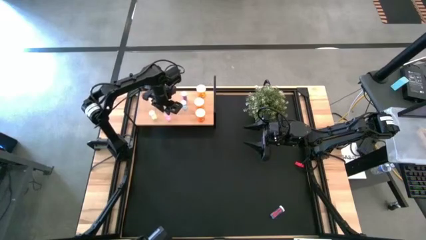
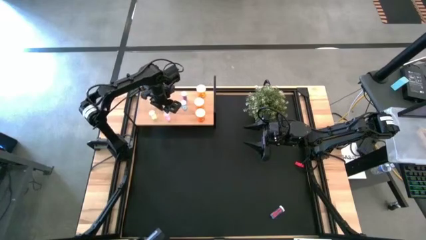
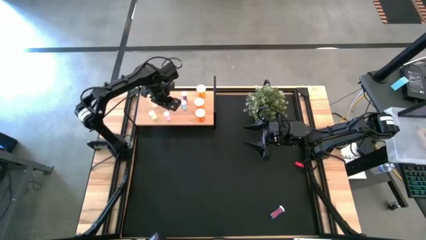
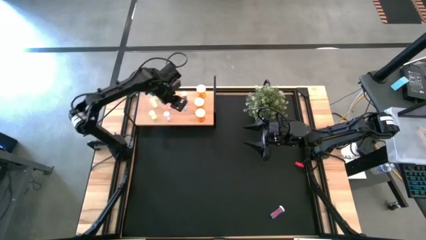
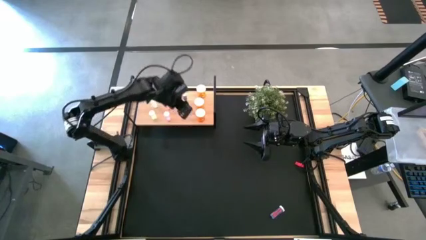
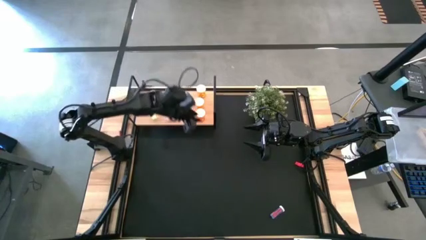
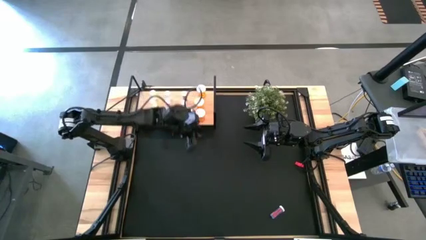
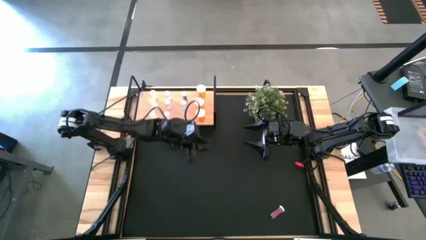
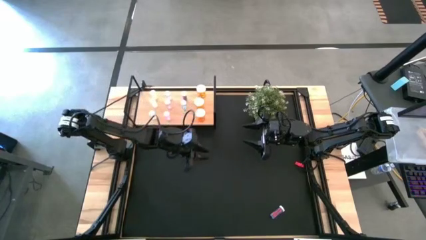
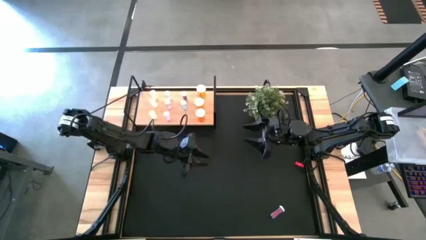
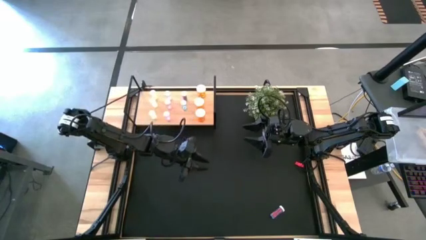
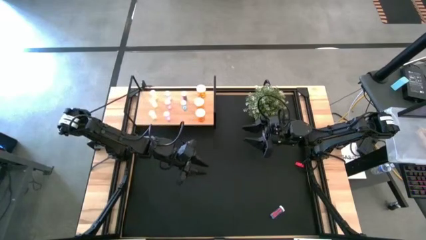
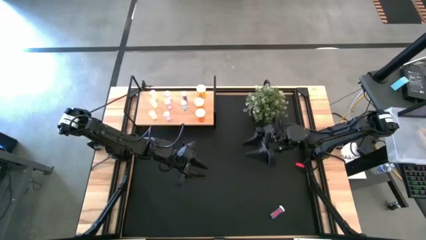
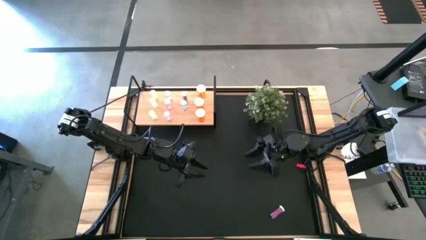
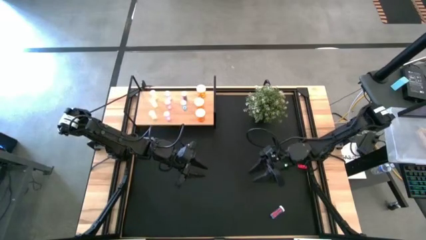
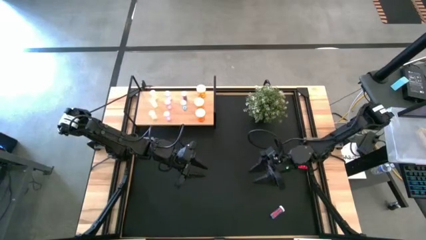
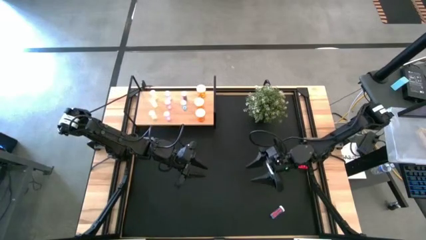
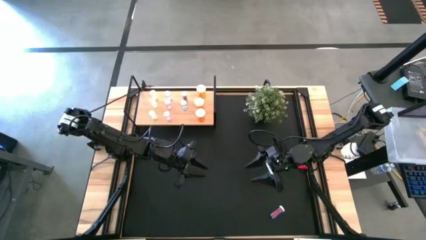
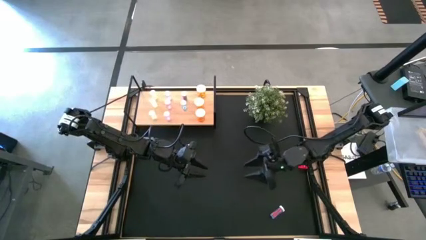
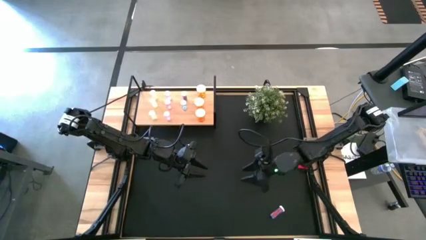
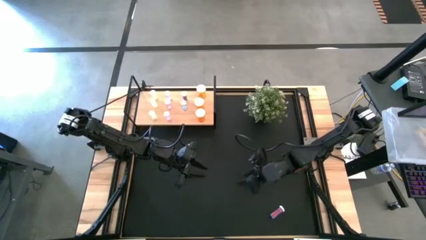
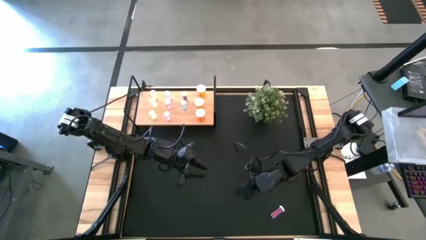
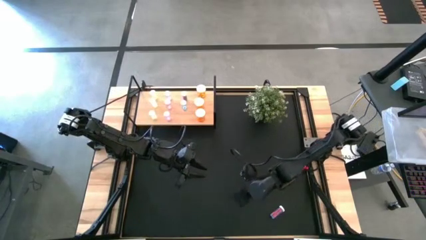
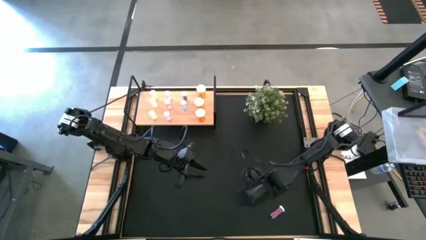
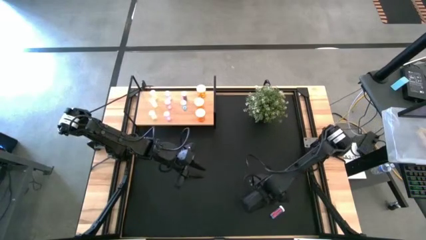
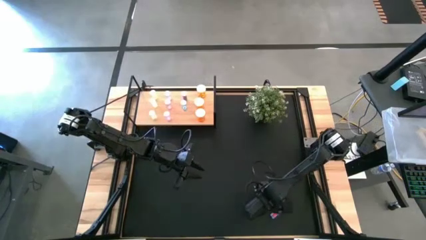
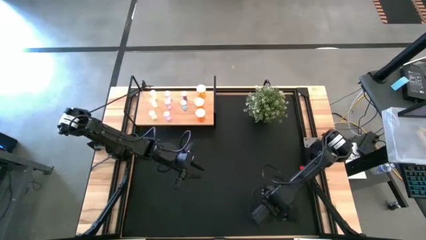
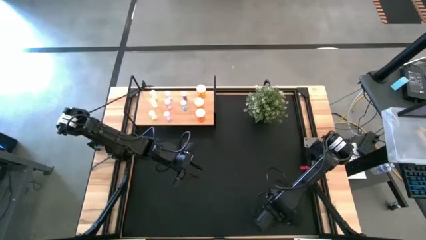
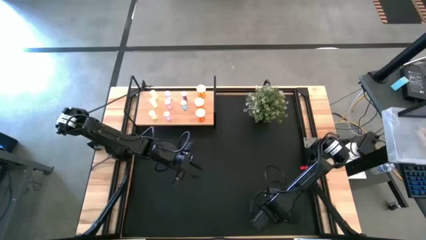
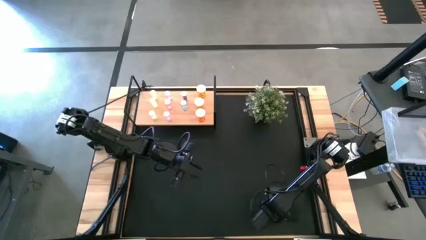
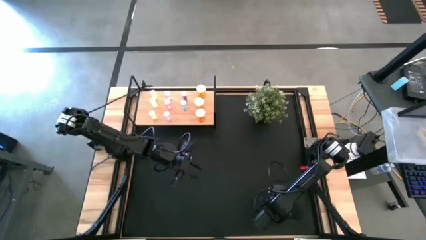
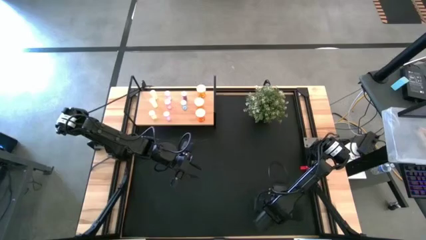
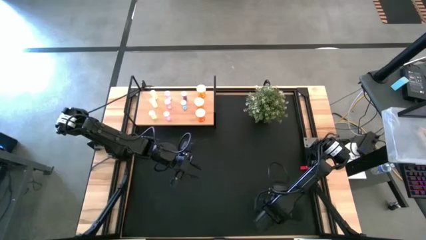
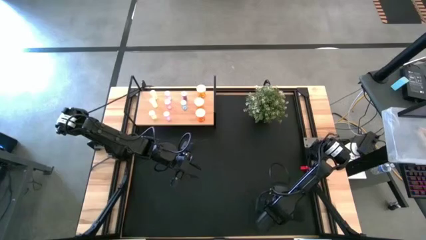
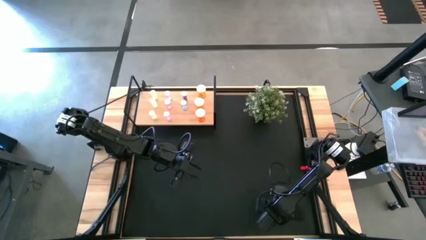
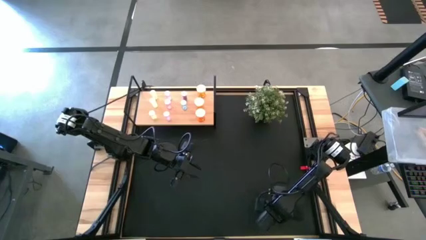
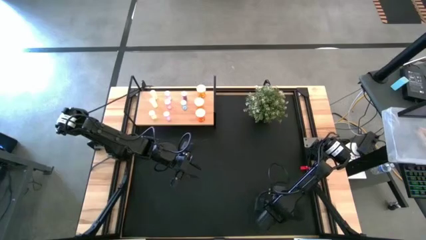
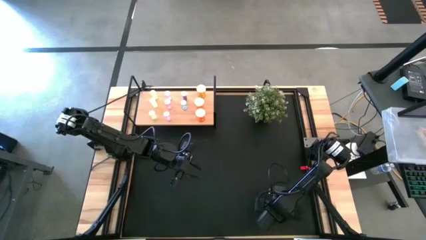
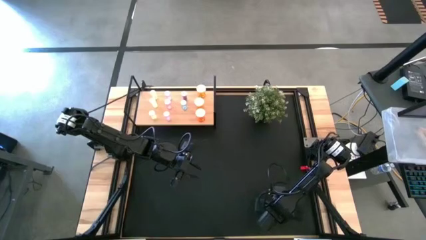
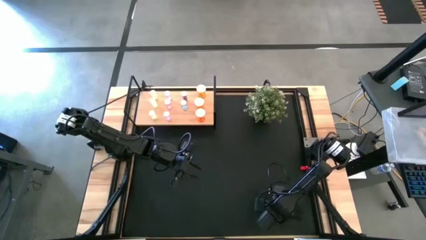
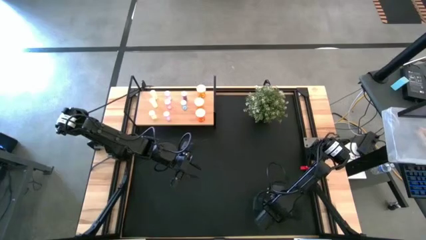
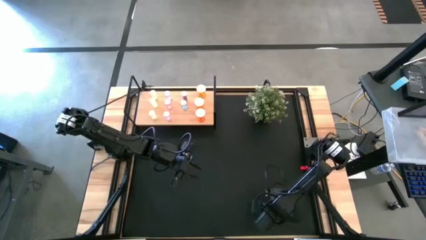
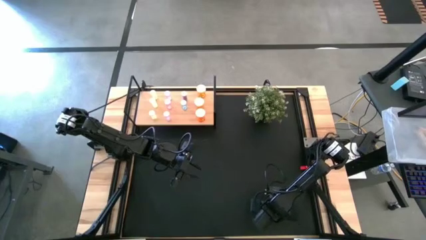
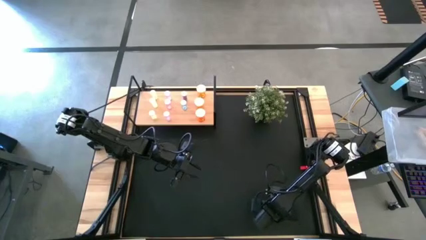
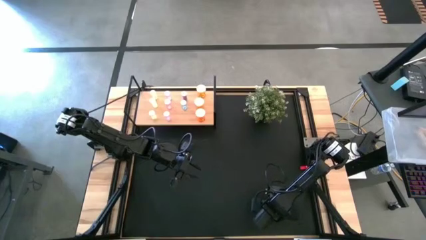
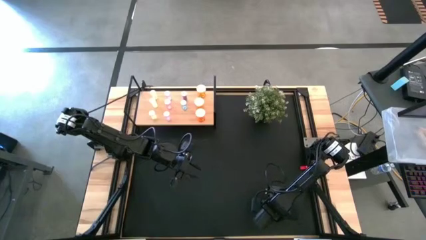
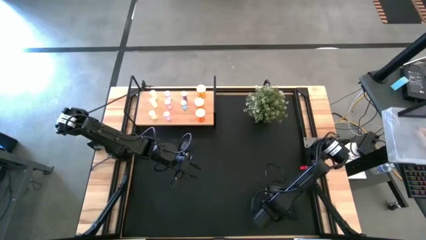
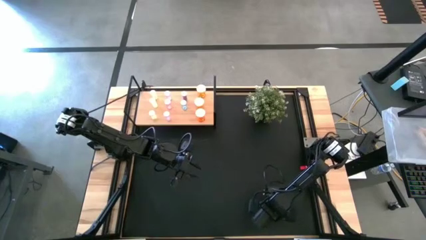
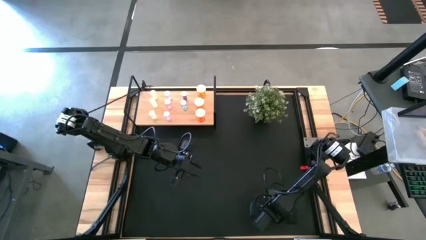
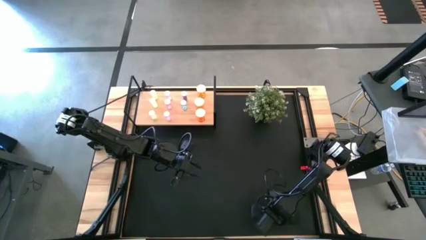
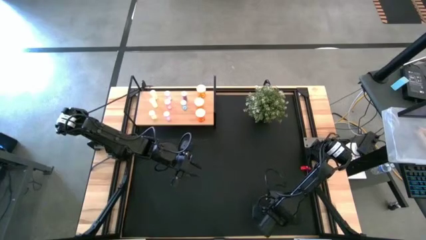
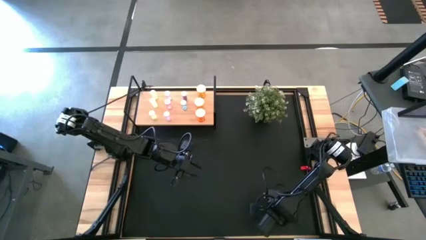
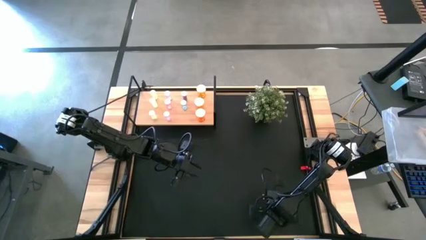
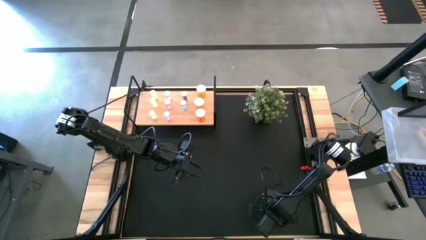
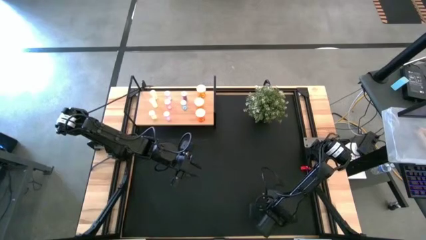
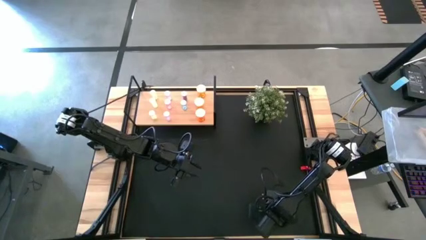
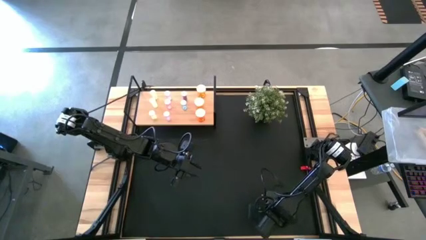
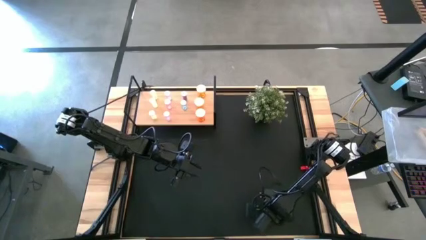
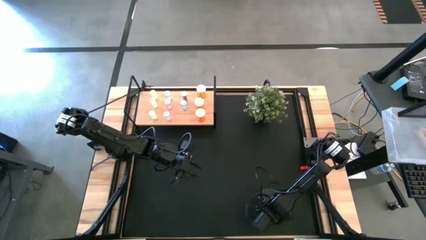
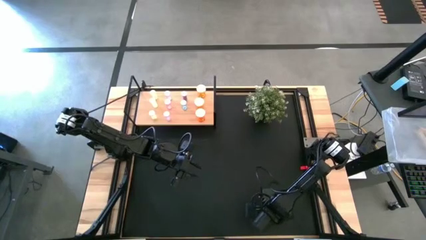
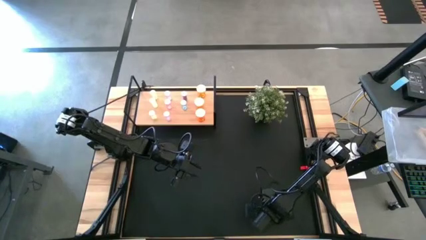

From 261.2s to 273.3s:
Task: Pick and place medicine bottles onto shelf by color
Put the blue medicine bottle on the shelf aligned with the other blue medicine bottles

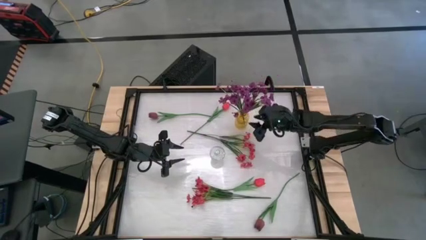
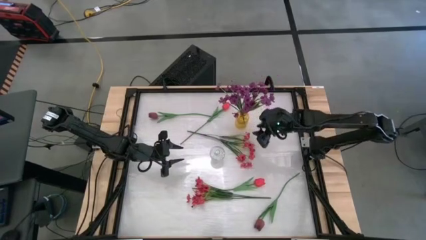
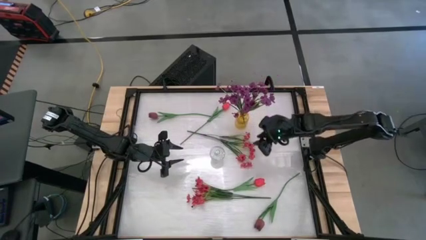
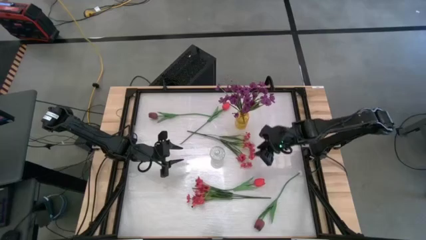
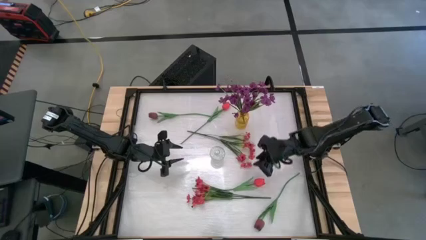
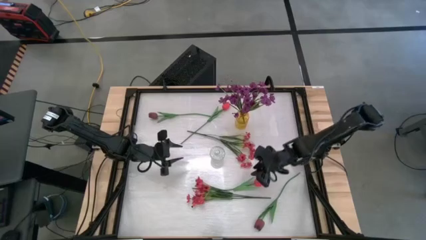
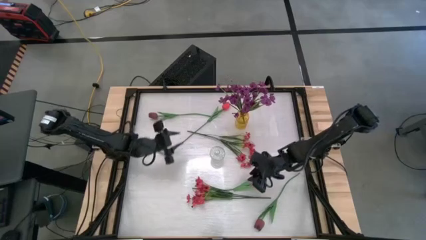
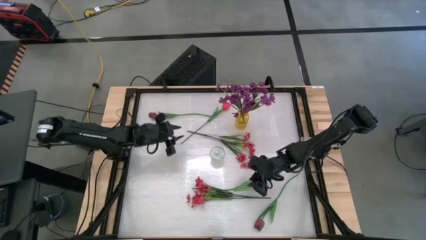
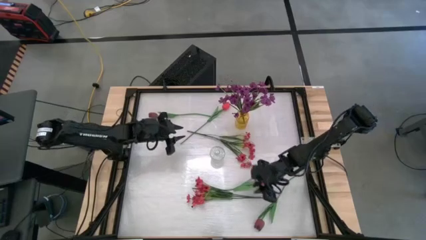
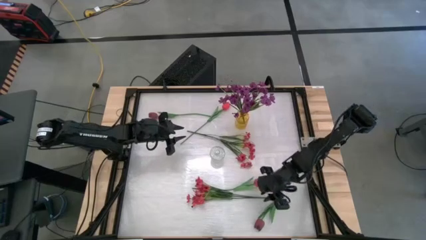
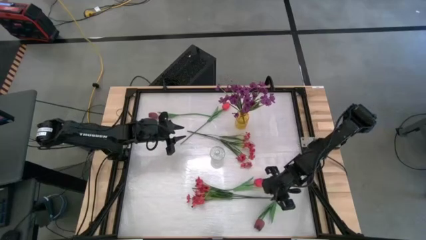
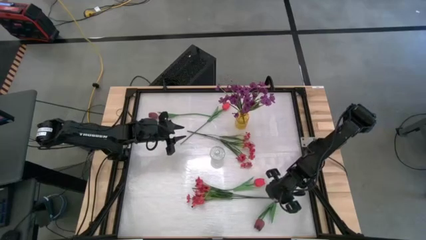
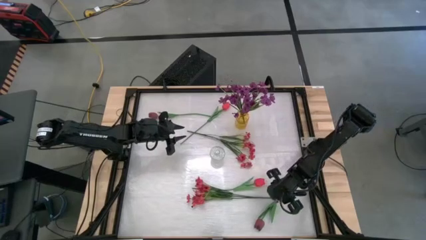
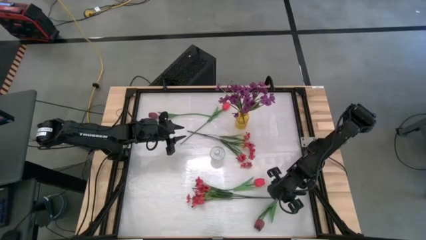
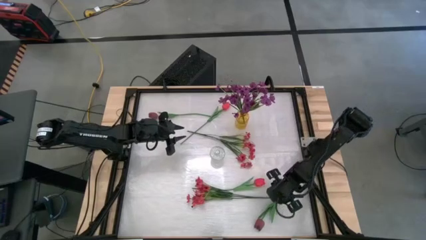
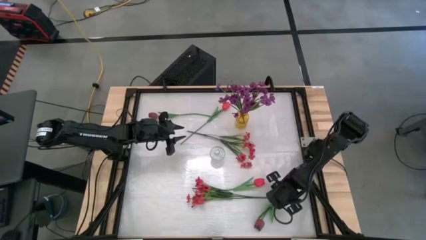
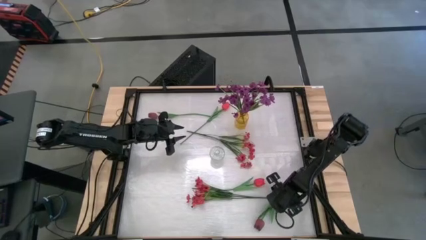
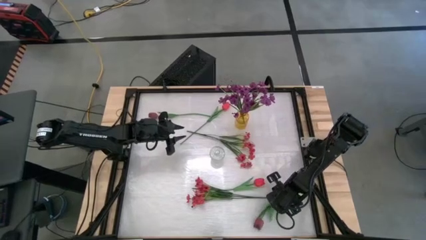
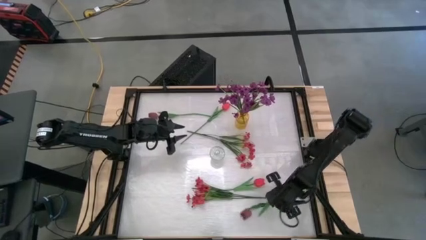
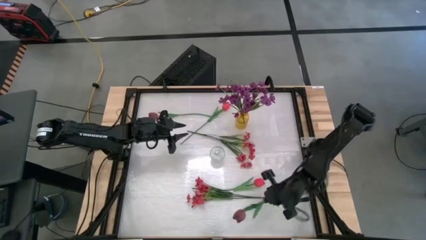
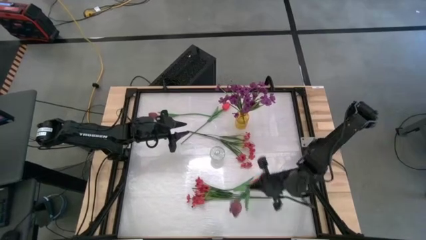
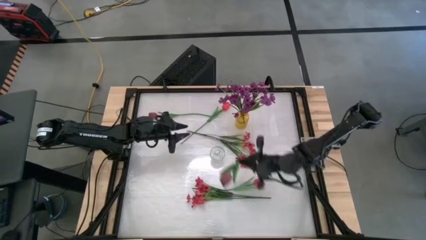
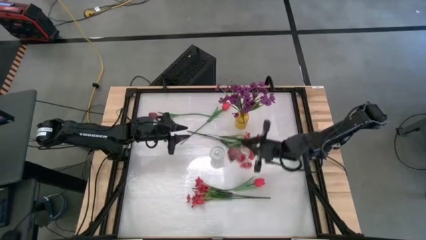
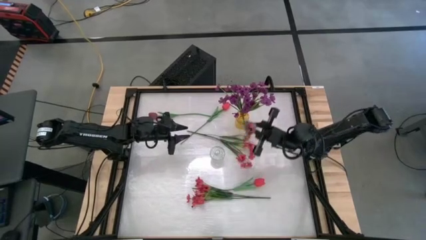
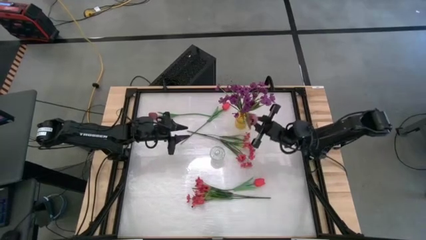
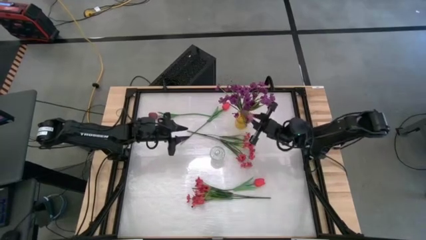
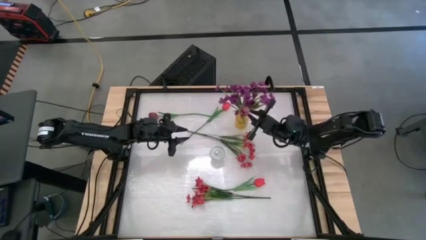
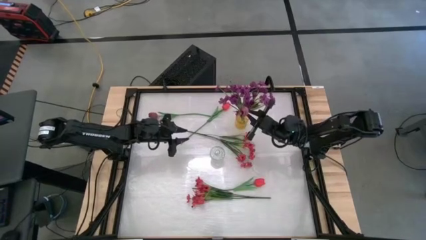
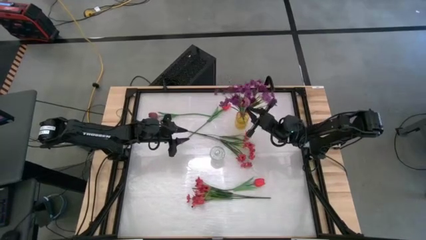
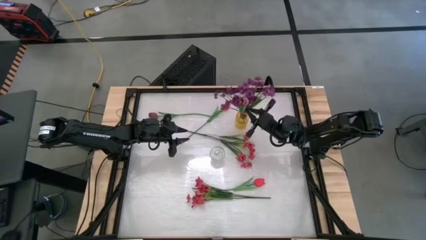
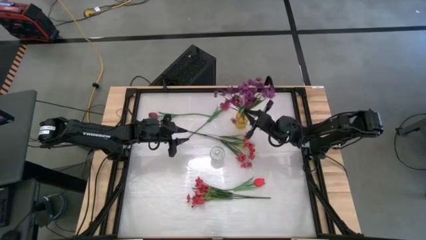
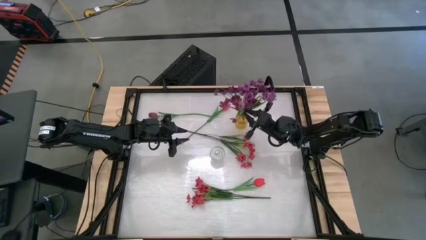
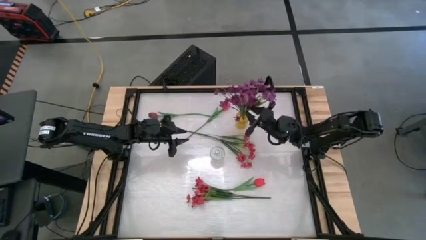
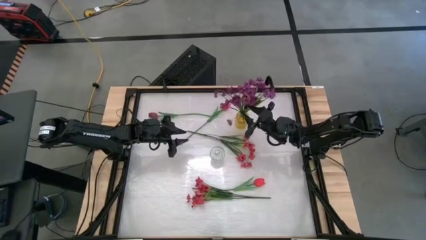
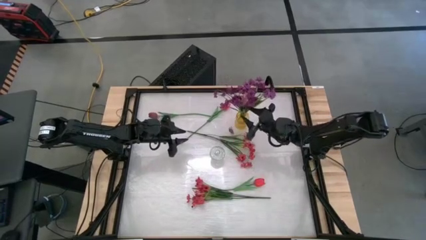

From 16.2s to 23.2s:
Task: Sort flowers into vase by color
Put the right purple flower into the yellow vase
